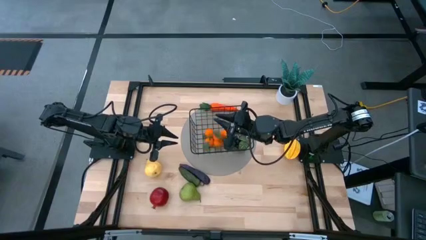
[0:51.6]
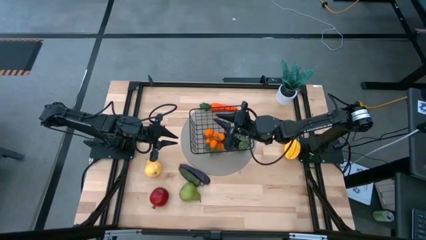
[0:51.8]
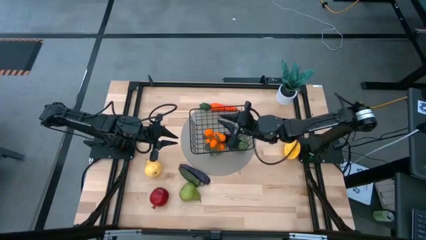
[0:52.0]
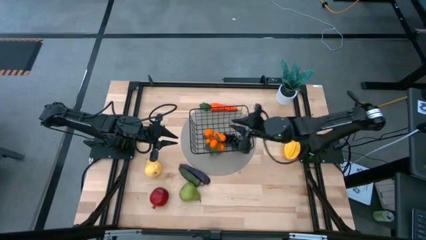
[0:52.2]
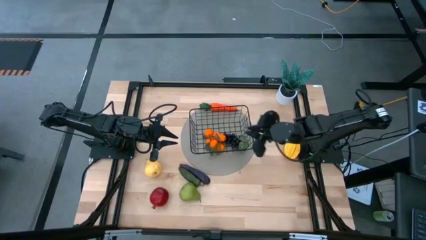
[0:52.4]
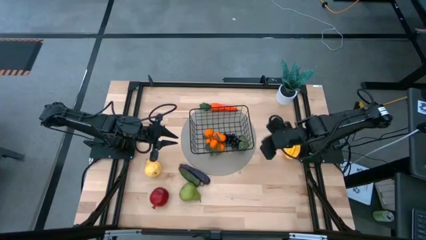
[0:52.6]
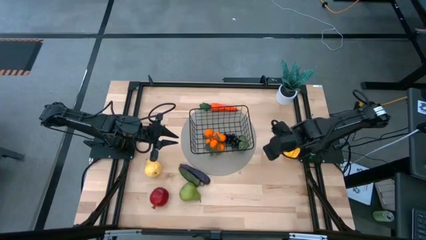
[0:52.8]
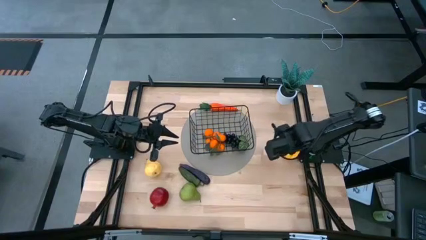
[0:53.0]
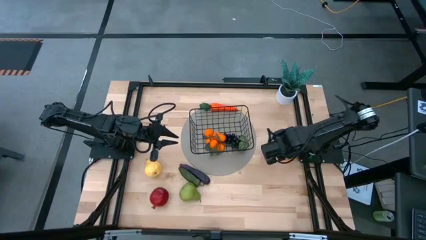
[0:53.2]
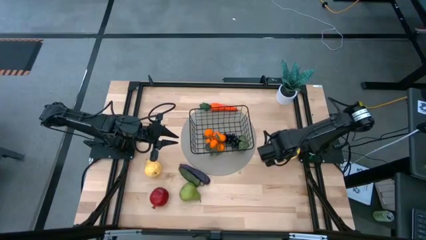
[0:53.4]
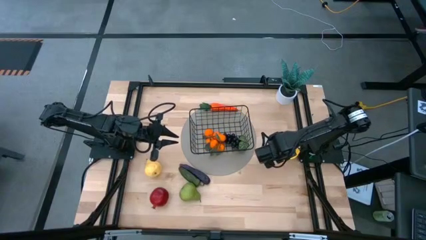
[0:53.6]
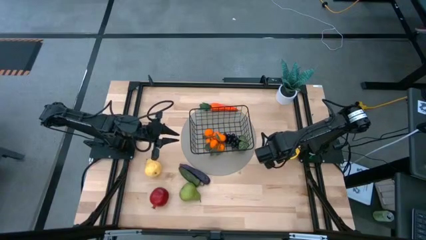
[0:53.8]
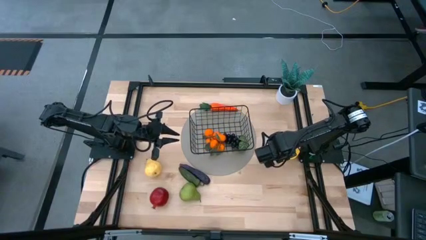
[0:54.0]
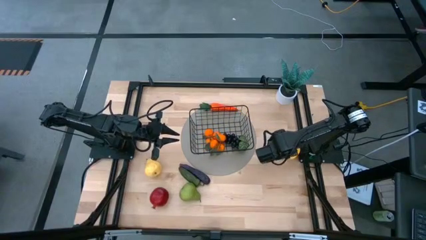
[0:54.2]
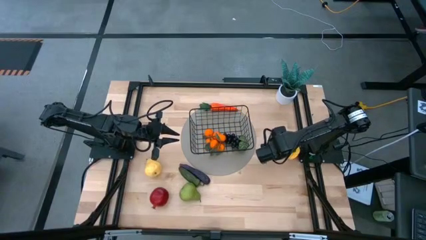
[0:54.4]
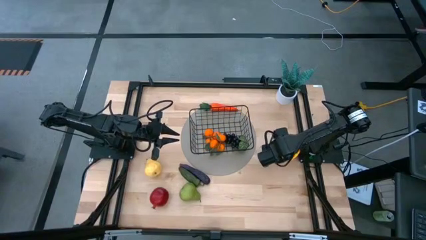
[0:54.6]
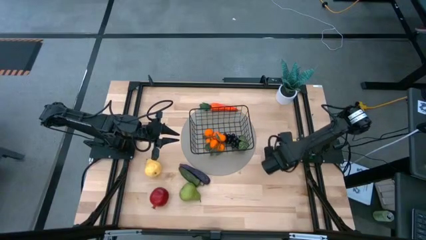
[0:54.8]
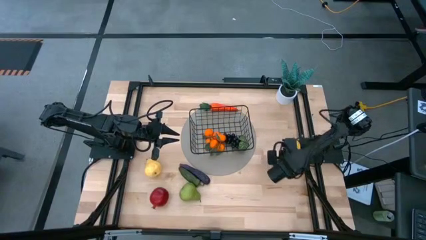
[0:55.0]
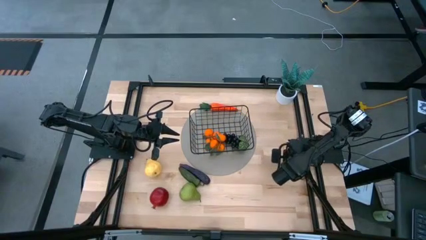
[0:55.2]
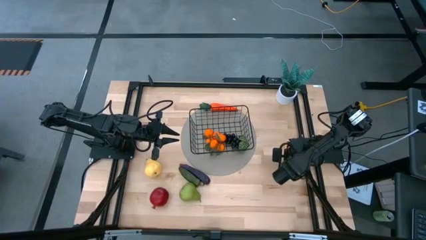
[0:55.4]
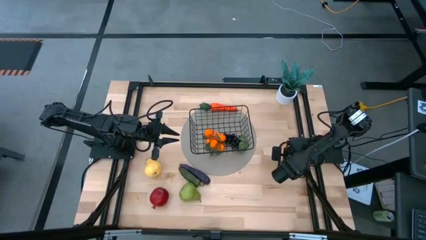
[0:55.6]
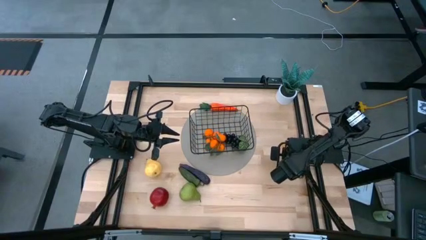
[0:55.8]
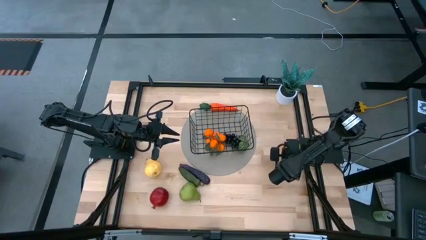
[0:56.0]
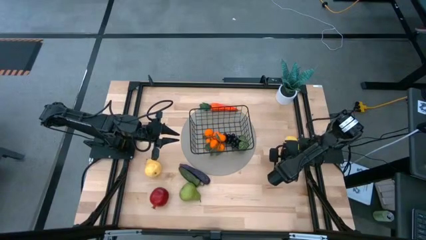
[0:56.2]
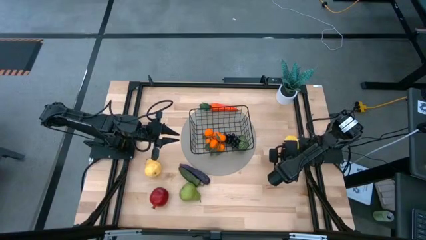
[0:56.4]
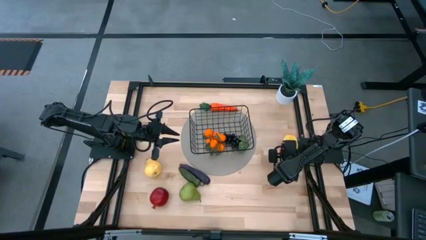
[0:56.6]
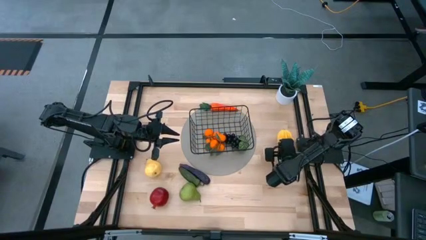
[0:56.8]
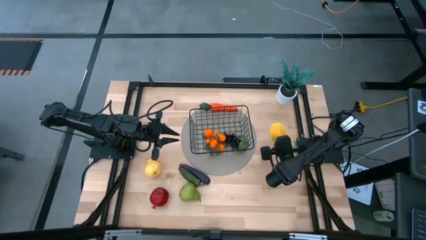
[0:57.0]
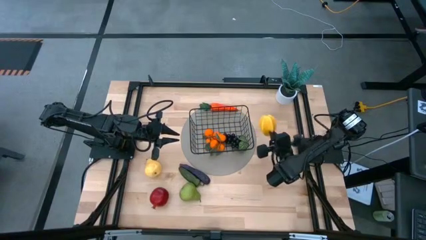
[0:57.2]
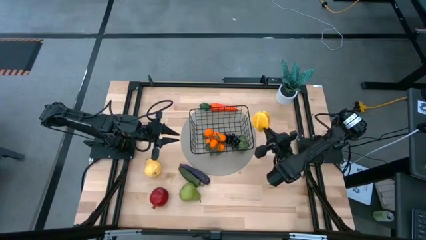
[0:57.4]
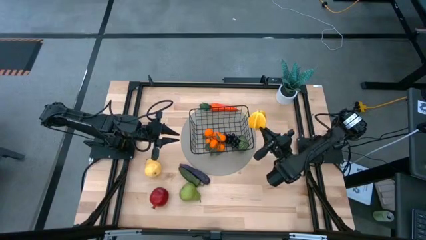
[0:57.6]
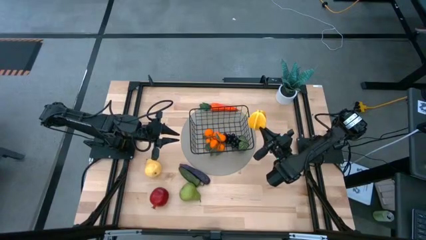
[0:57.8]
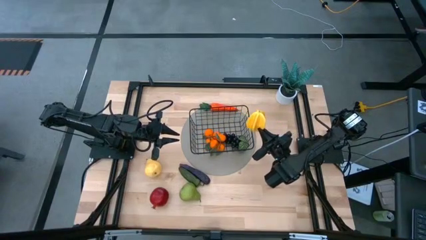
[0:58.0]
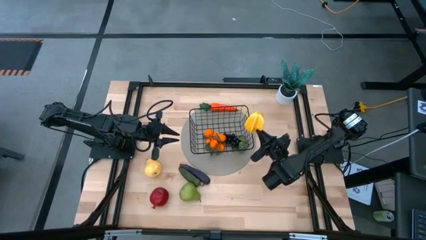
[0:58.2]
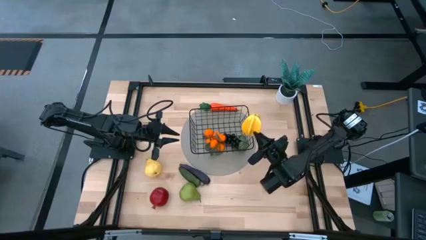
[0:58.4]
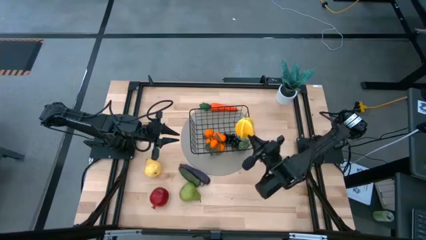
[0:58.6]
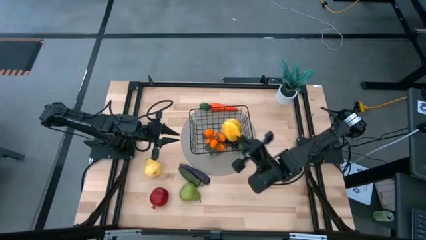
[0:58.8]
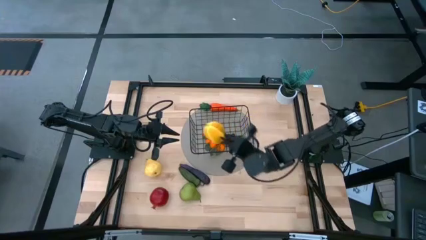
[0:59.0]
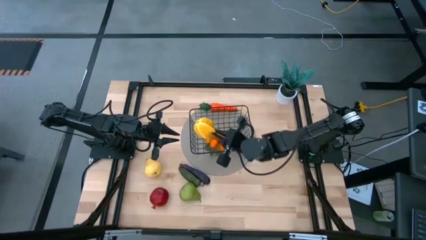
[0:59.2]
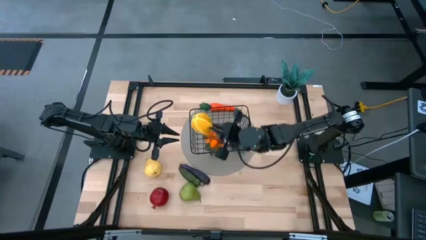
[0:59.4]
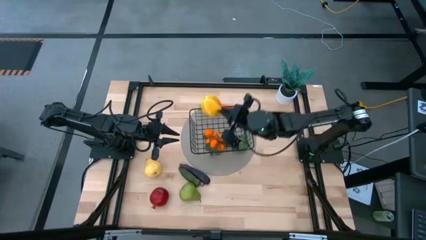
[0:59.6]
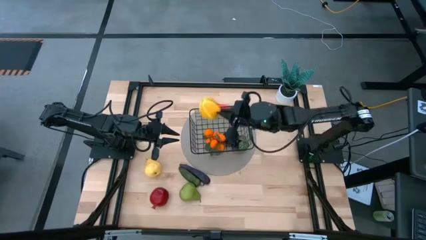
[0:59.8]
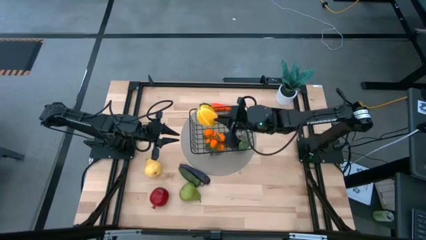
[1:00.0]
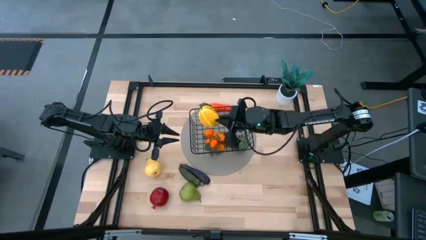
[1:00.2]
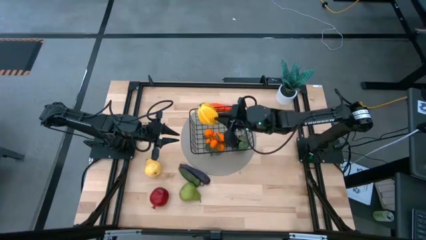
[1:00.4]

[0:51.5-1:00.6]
Task: Build produce basket
Put the starfruit in the mesh basket

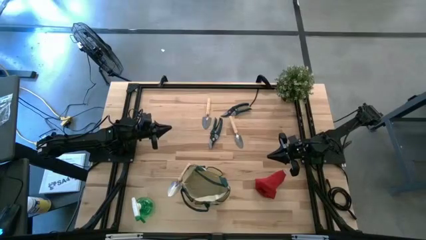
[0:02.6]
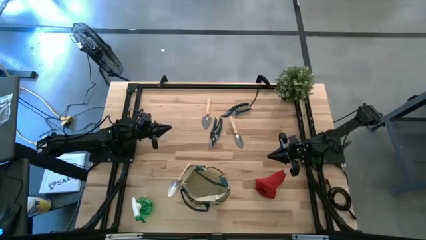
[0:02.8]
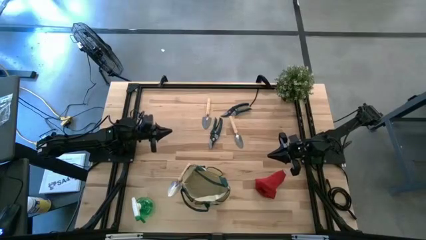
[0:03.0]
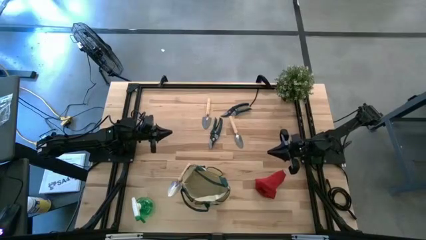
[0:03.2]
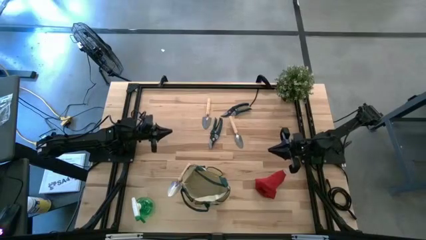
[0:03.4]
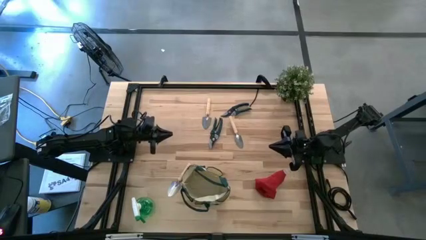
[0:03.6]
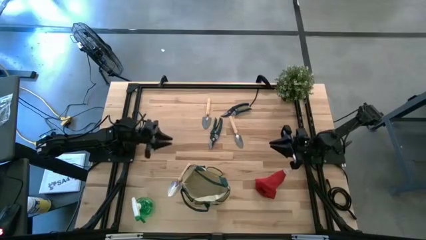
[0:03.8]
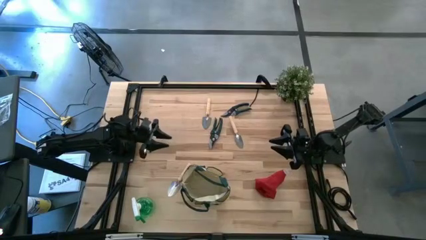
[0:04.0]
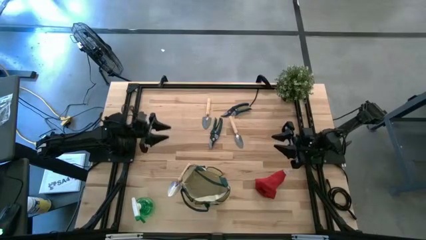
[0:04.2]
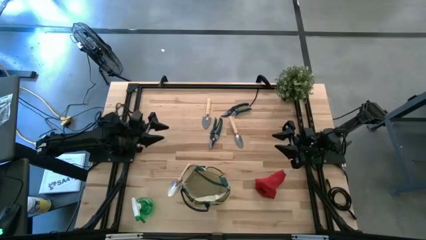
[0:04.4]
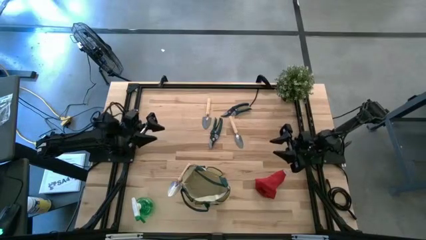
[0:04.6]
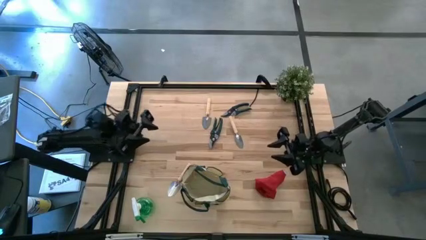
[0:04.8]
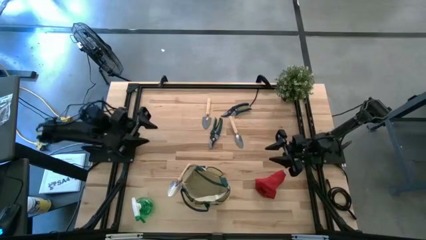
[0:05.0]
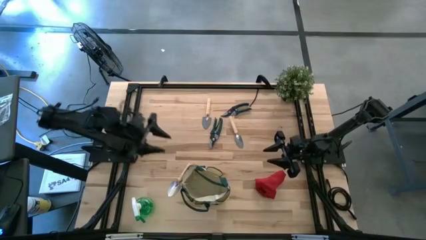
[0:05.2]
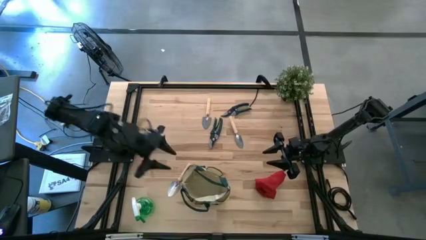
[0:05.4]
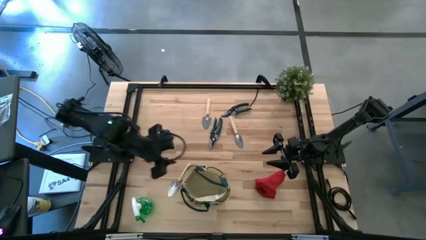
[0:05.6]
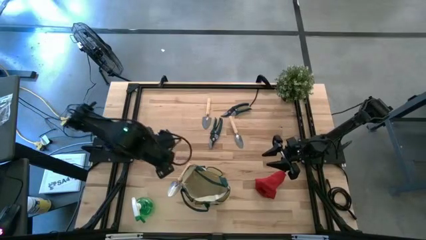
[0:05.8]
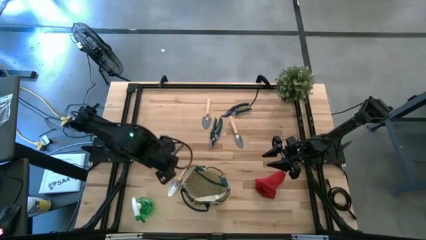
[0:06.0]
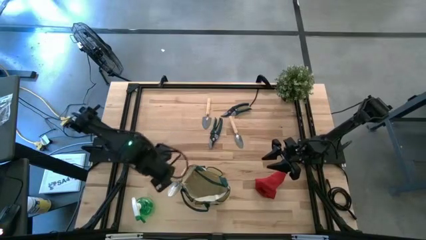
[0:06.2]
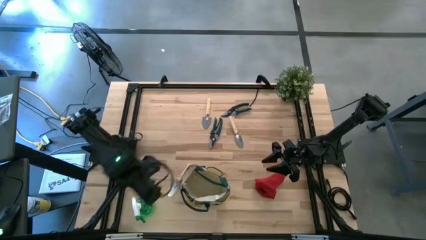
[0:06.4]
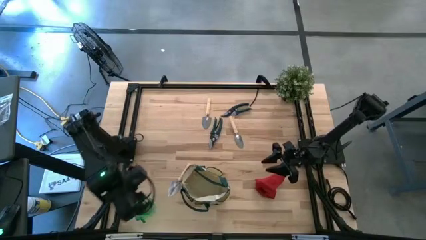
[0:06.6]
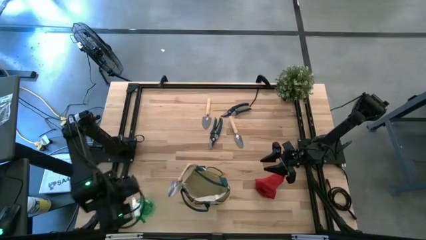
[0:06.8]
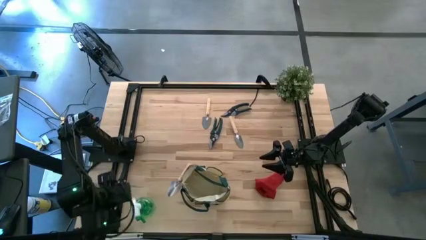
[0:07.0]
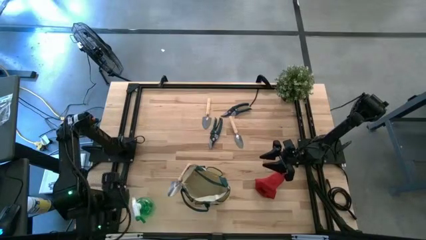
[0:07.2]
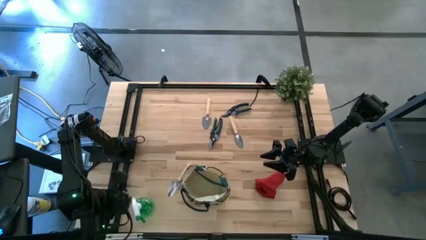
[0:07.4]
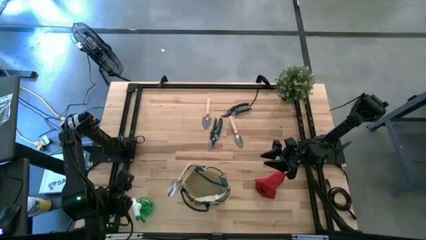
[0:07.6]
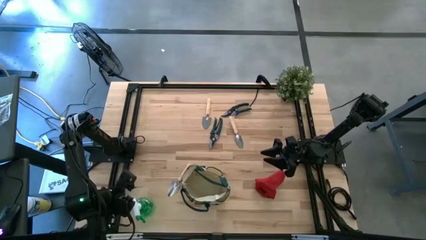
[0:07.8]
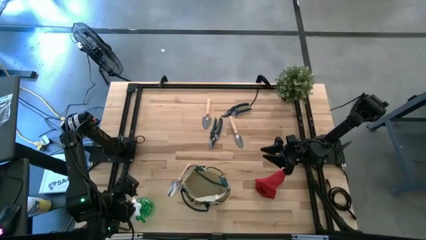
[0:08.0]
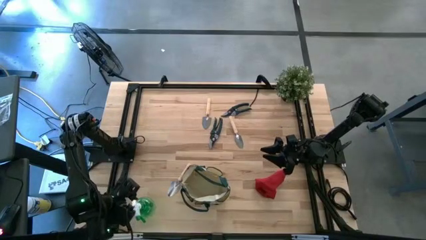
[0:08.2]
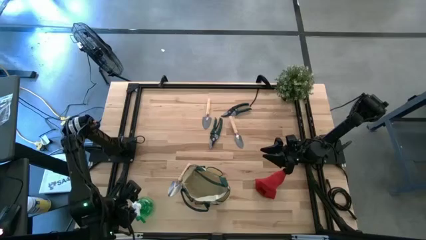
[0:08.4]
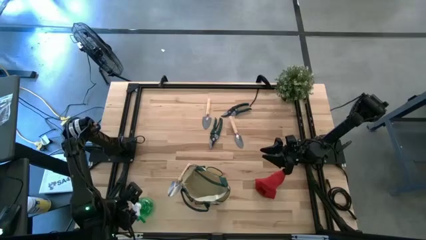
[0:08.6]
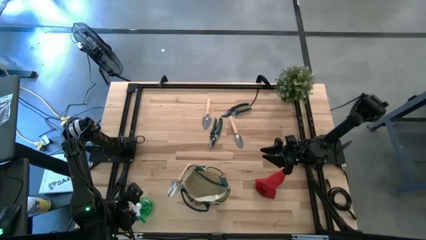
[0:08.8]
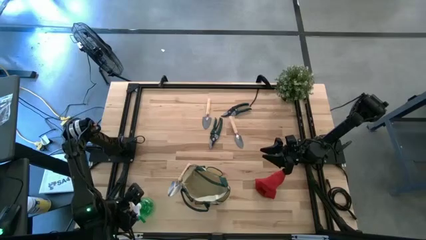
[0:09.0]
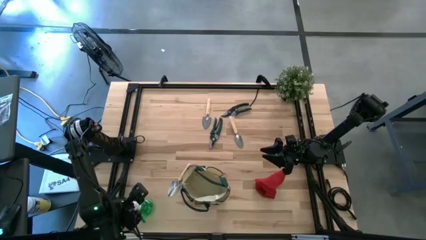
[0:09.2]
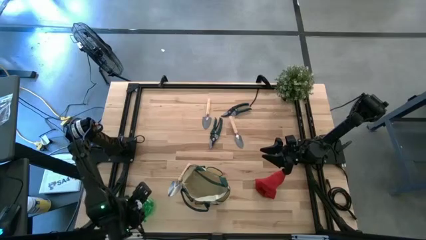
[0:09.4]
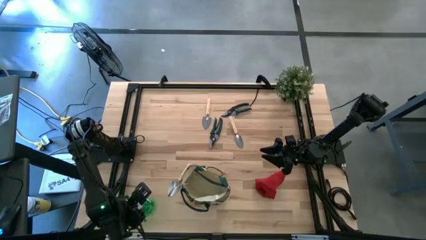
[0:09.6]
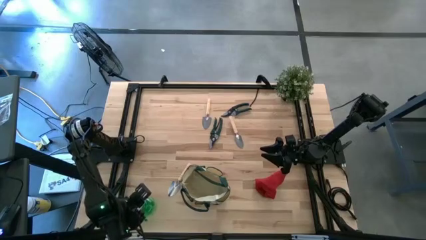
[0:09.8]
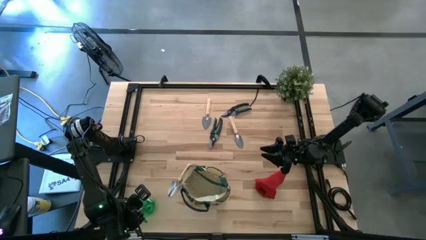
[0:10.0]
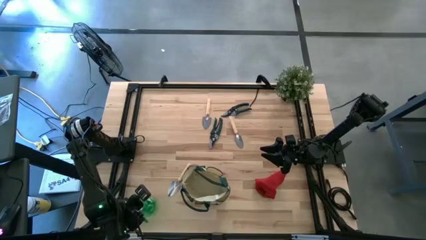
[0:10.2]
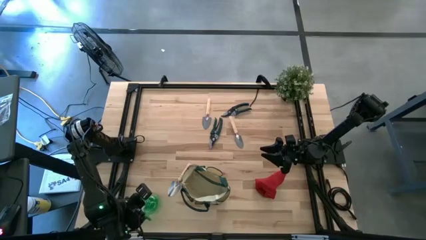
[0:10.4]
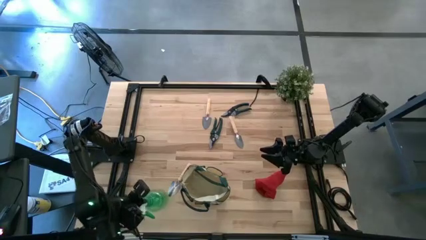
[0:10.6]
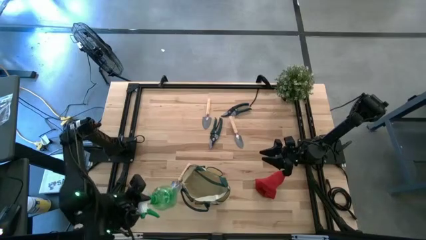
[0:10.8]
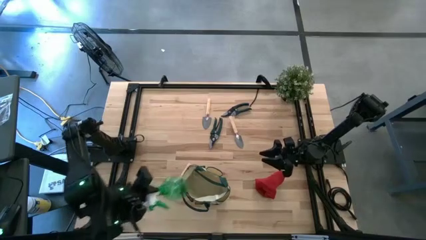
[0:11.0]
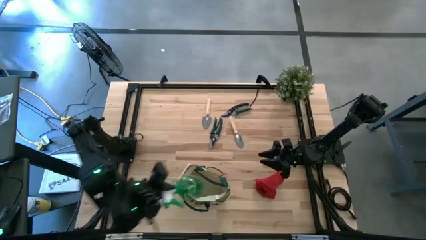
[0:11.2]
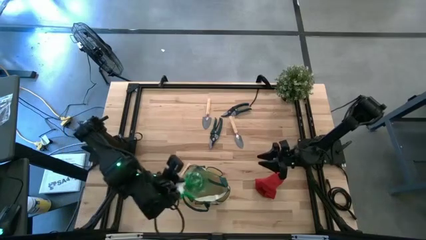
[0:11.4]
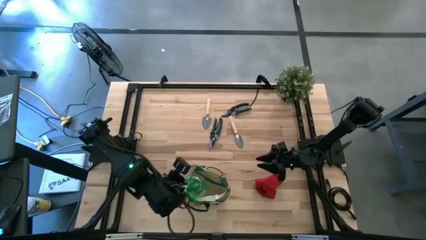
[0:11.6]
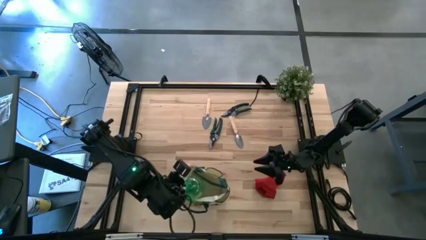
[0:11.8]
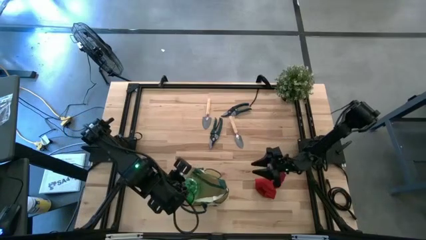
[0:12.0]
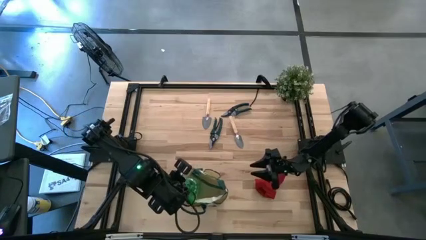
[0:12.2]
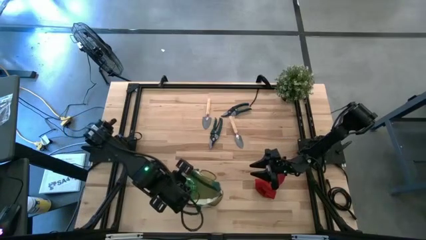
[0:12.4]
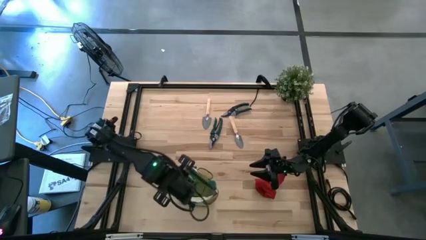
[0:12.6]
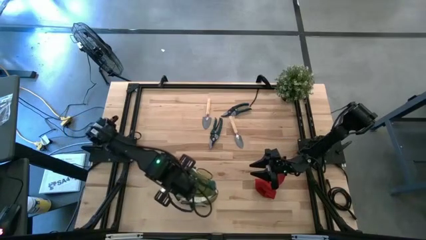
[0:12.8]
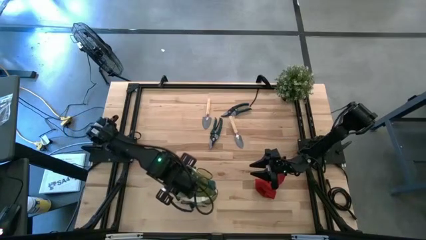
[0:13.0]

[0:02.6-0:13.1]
Task: Pick & Place Garden tools in Gardening bag
Put the spray bottle into the gardening bag
